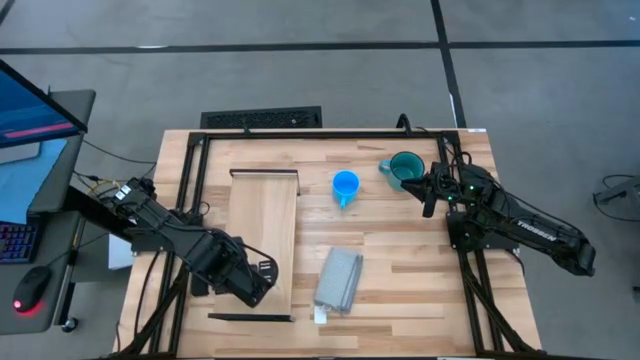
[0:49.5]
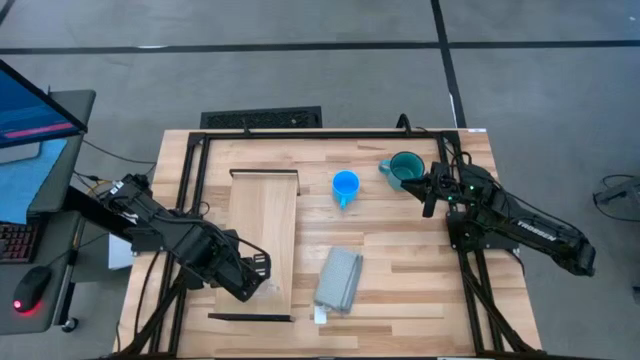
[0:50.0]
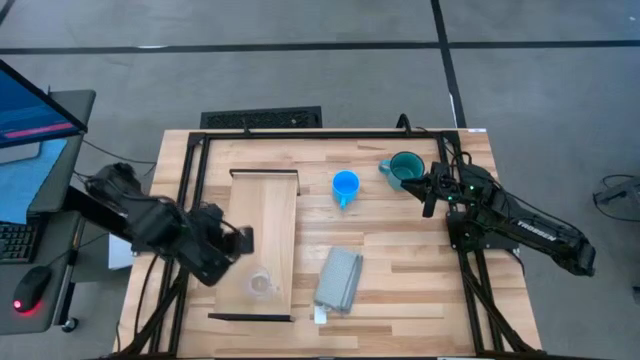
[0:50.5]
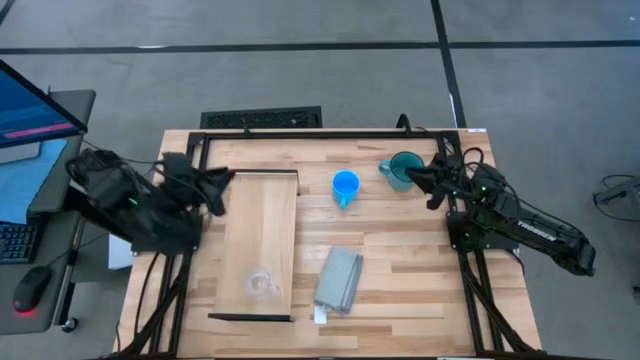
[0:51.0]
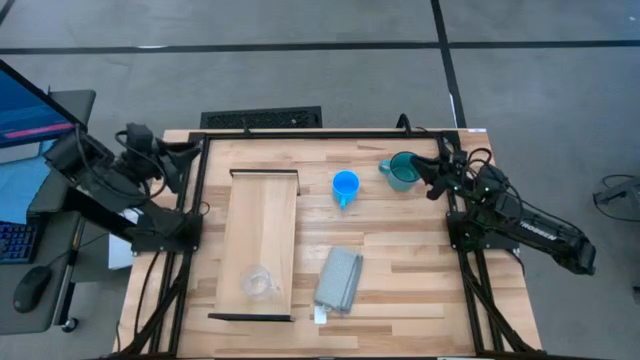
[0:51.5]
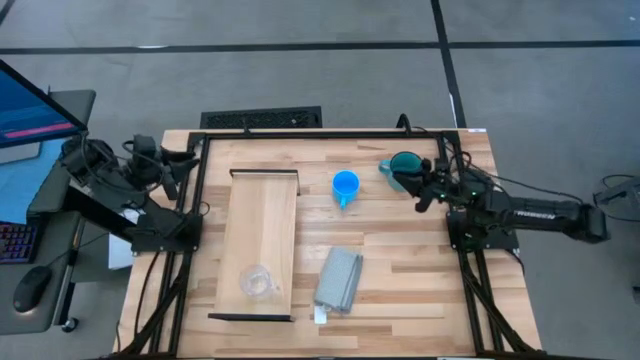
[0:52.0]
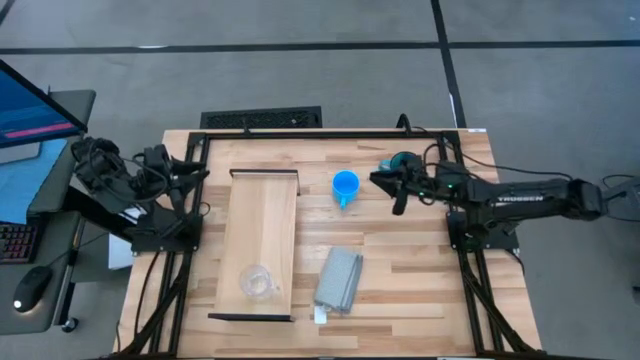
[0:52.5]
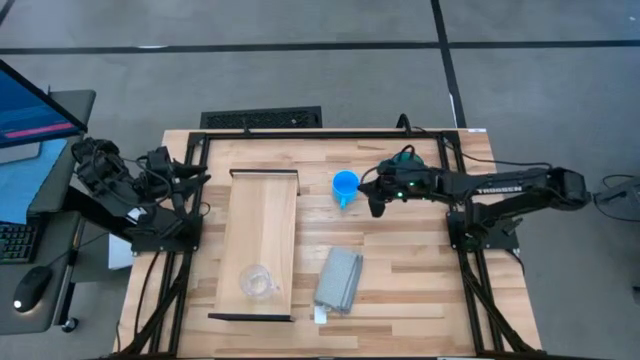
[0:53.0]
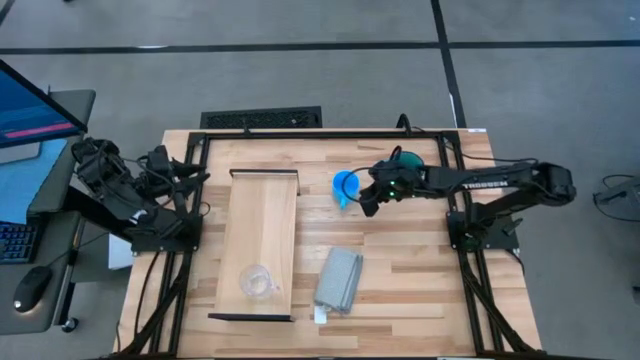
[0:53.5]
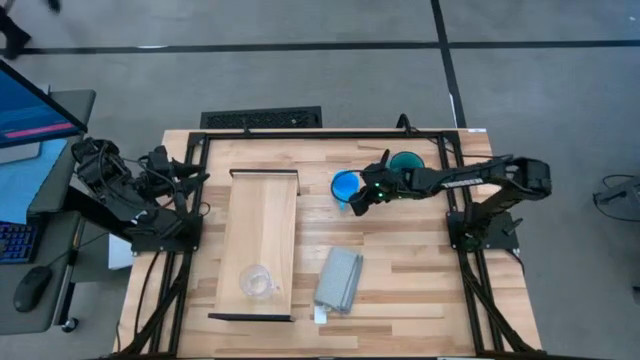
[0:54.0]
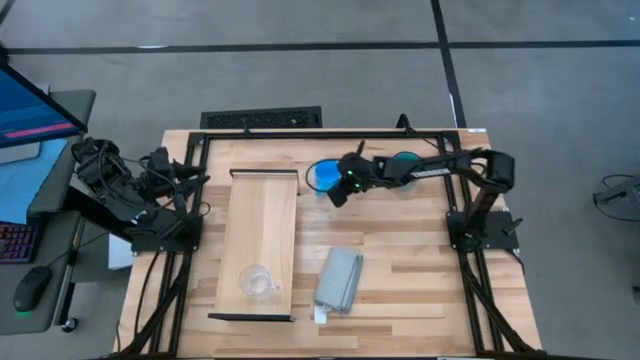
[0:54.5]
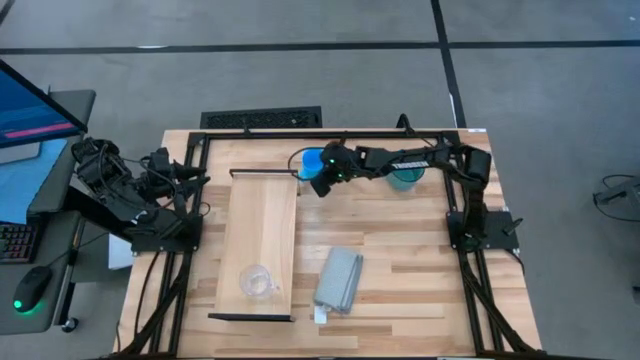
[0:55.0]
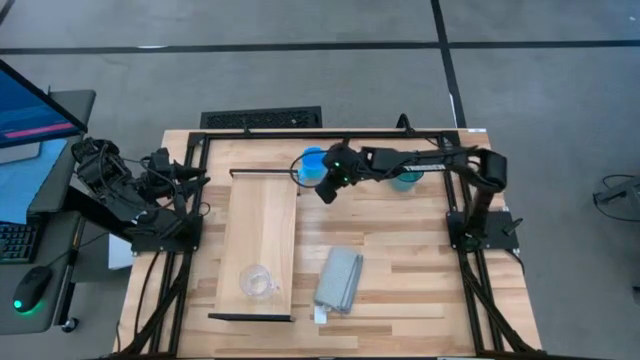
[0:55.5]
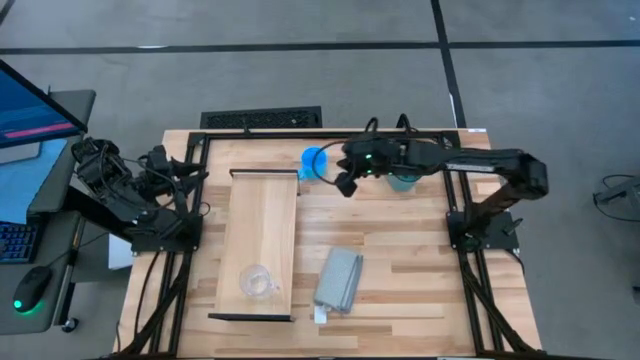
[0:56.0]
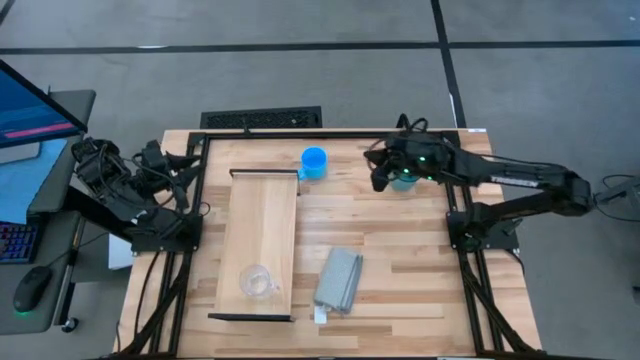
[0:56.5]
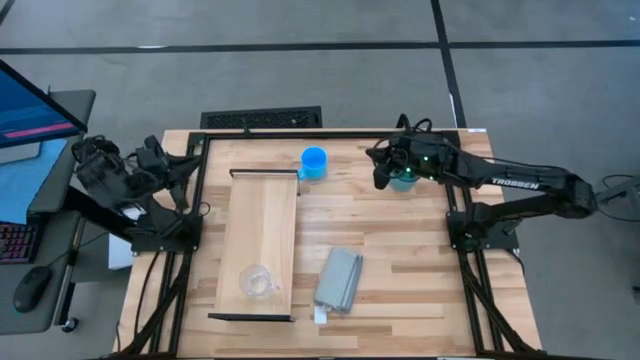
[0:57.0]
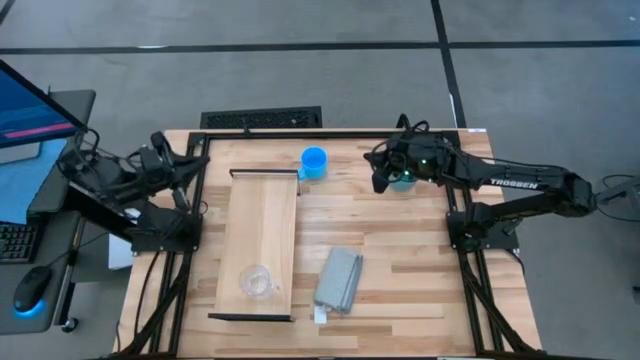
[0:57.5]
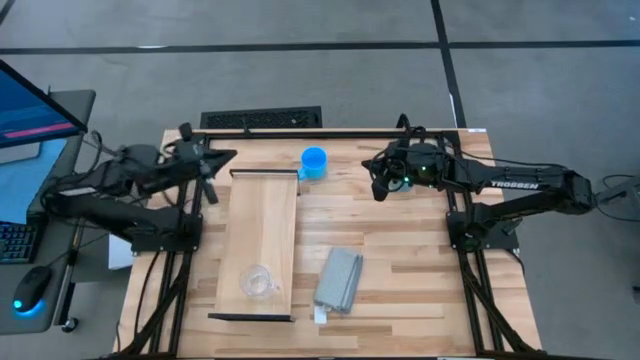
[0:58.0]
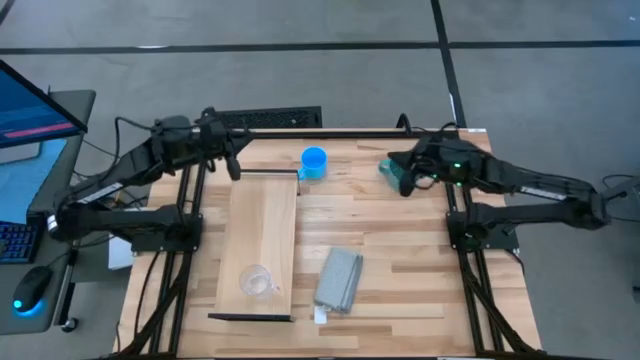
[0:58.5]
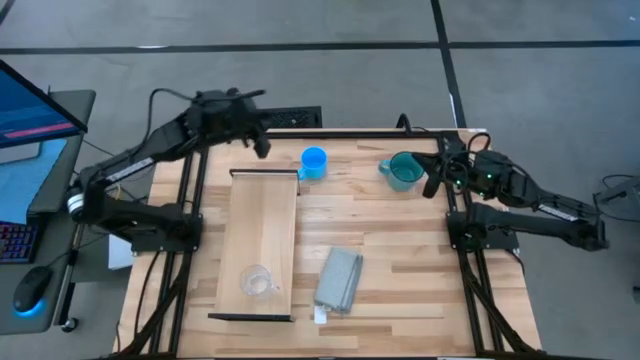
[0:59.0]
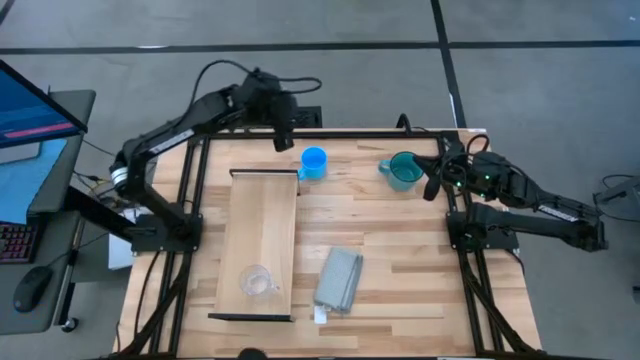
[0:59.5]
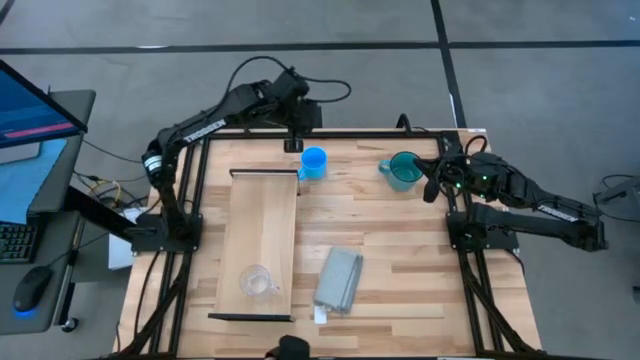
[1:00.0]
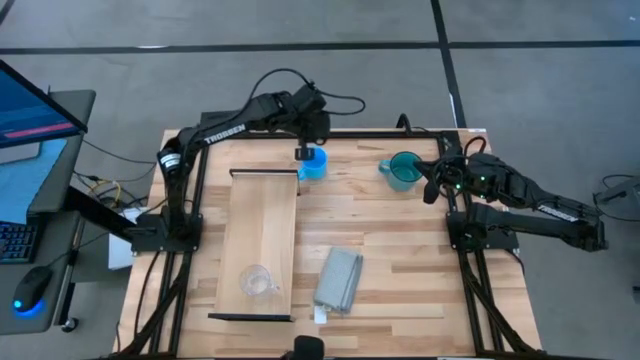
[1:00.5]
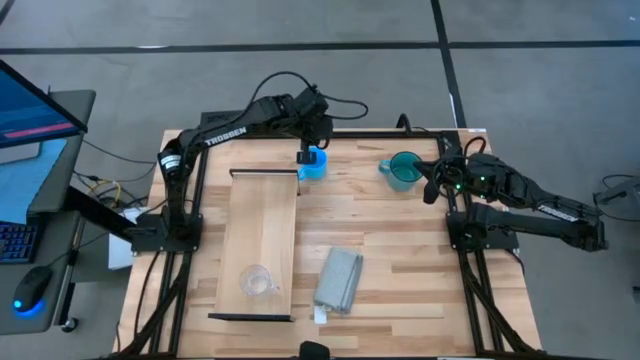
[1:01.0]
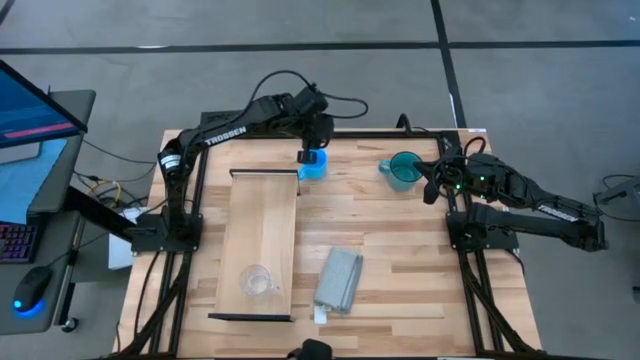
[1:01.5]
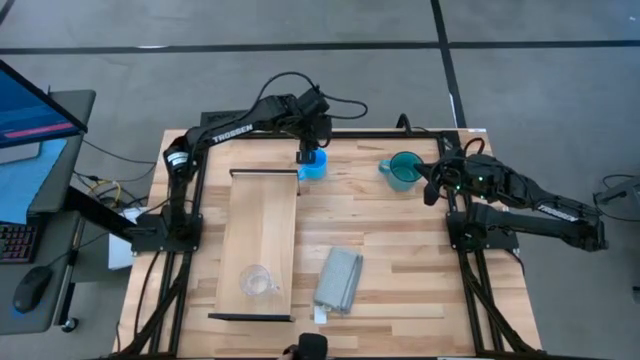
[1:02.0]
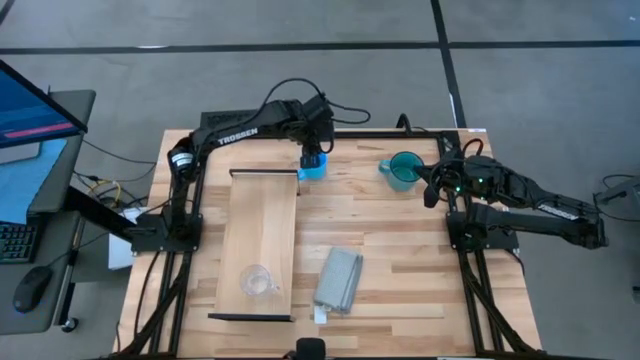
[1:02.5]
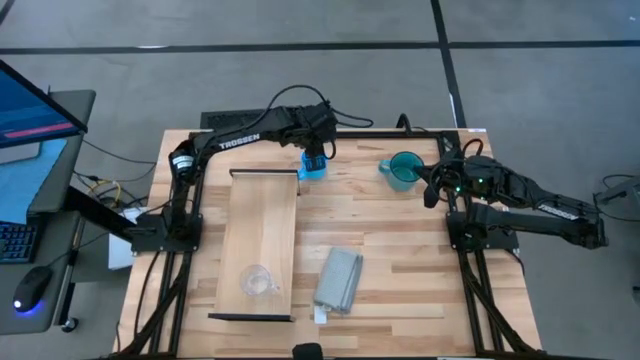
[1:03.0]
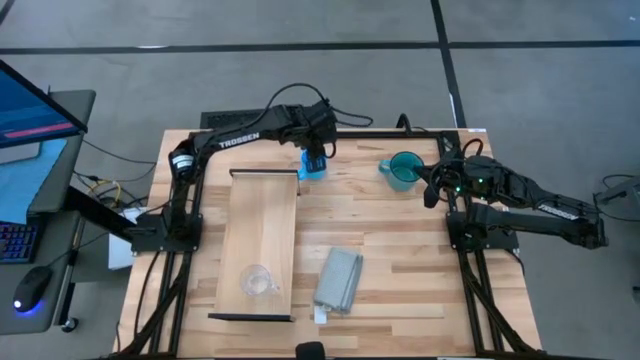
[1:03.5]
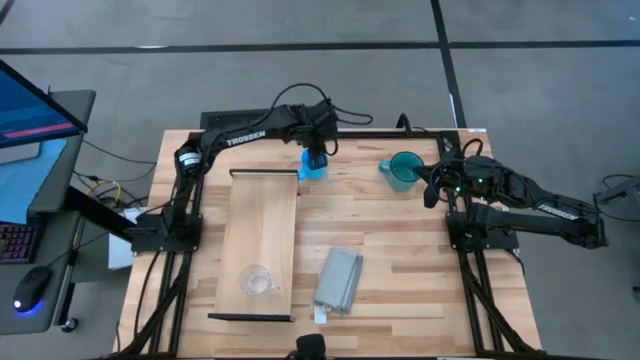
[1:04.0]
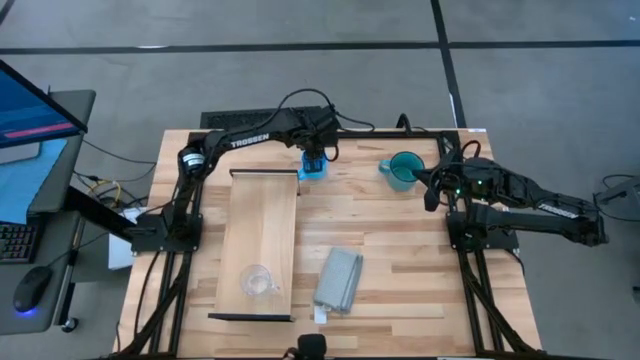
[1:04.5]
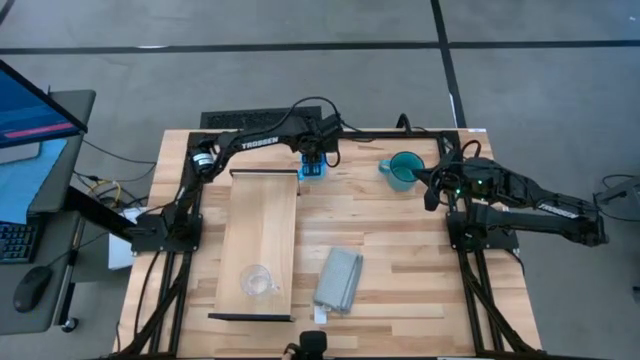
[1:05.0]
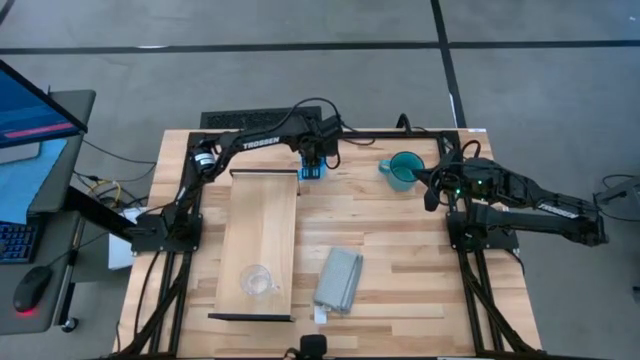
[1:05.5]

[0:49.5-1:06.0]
Task: Stack small to large cups/mugs on shelf
Put the light blue mug on the shelf
